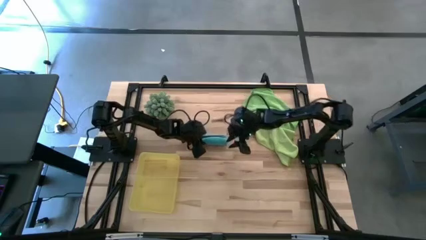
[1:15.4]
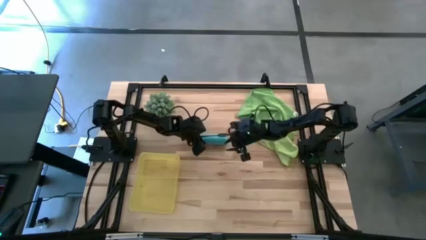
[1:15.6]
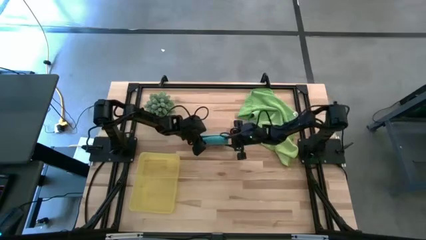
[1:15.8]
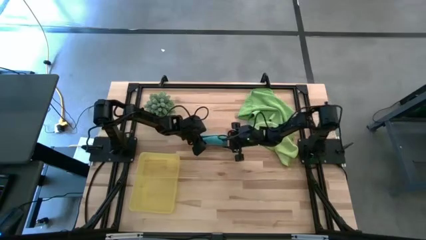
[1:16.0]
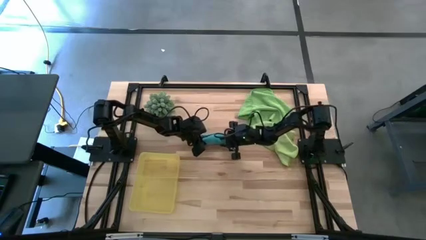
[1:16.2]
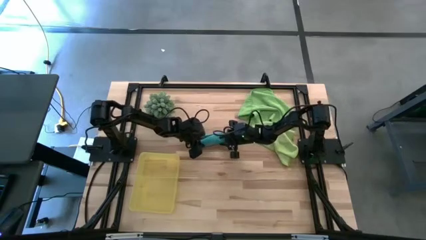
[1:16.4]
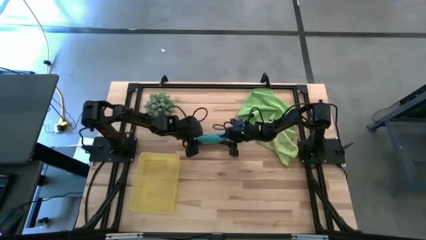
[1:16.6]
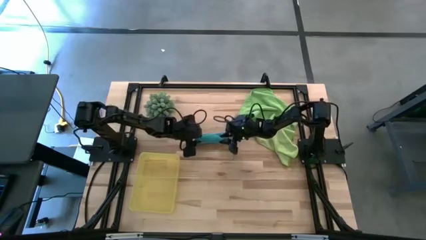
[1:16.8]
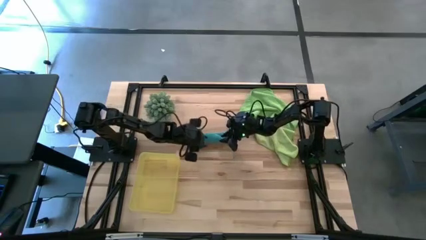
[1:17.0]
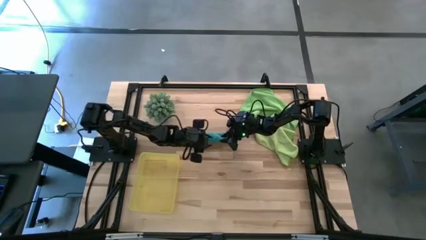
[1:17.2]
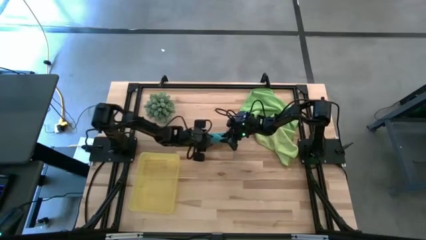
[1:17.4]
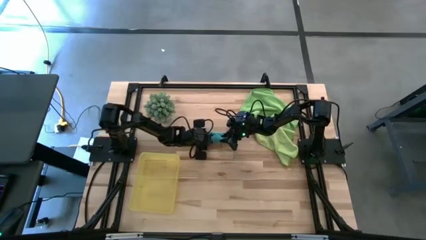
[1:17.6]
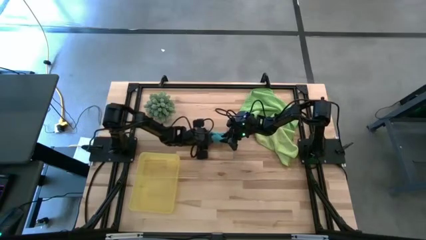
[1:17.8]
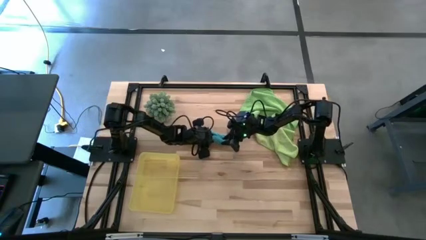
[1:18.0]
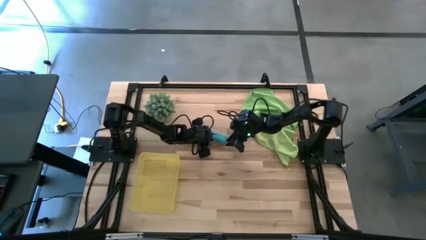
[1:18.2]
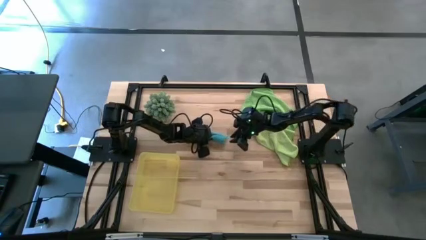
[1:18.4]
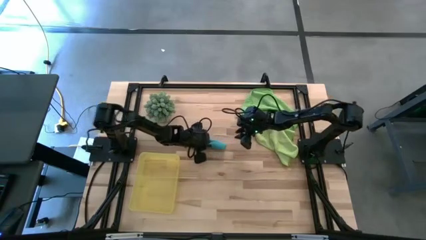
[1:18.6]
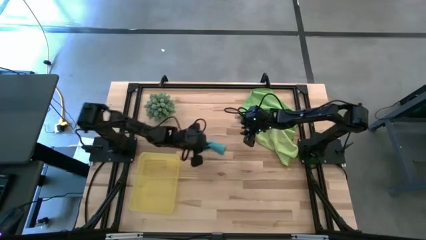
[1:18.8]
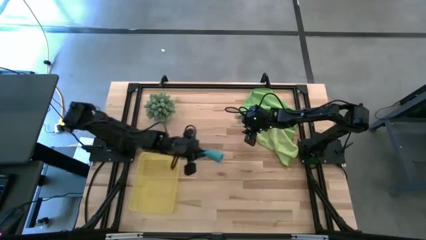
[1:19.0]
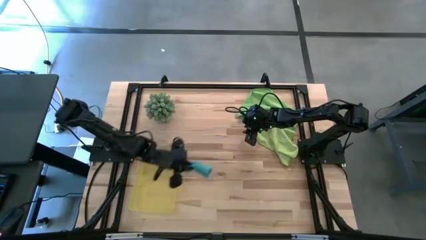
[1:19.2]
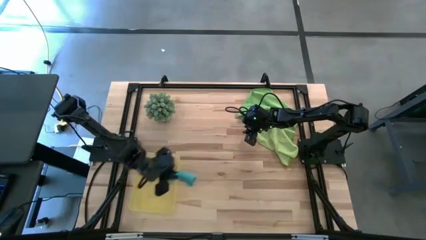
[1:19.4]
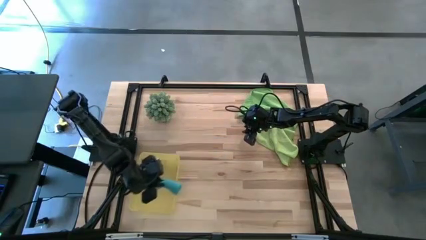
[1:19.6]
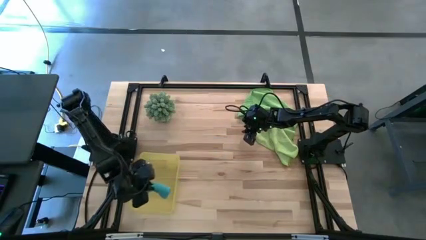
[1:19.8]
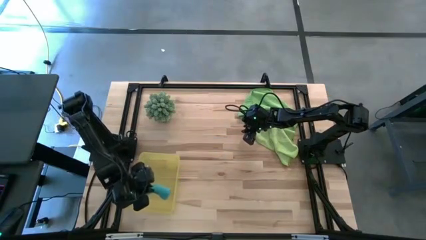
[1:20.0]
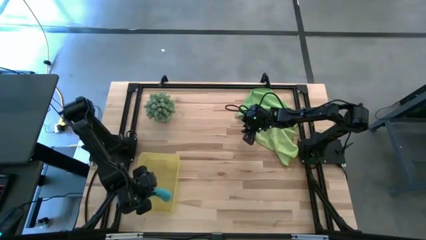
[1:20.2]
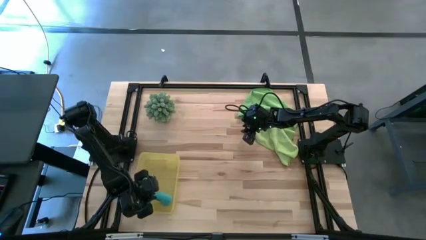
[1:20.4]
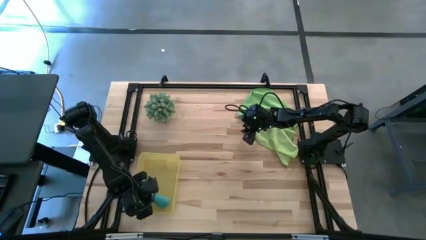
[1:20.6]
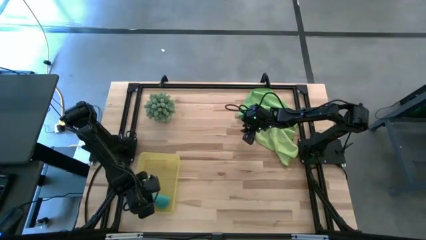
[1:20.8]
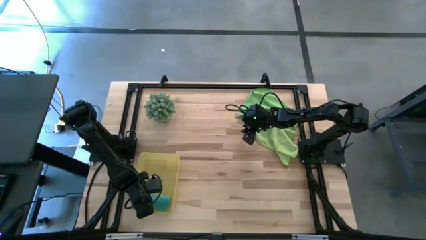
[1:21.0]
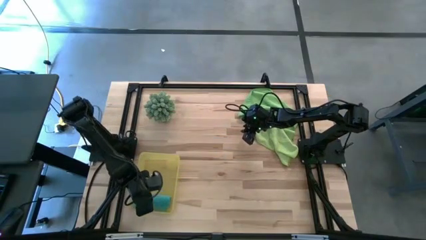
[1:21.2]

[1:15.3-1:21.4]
Task: Roll microfiber towels into tight, uniform cylinder then place into a basket
Put the blue towel into the yellow bin

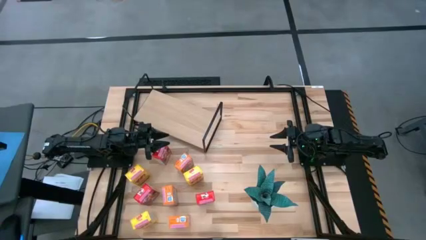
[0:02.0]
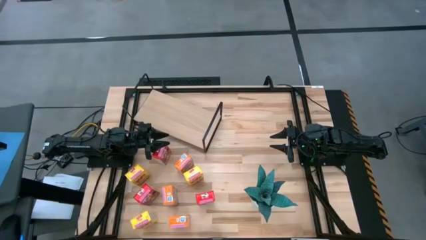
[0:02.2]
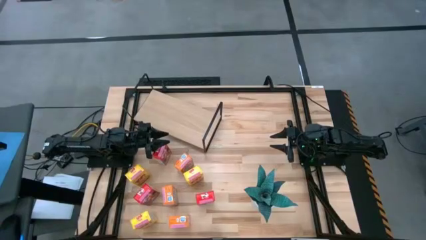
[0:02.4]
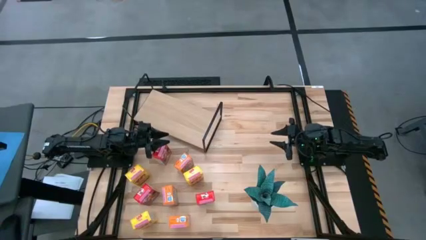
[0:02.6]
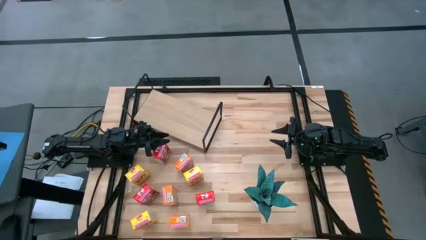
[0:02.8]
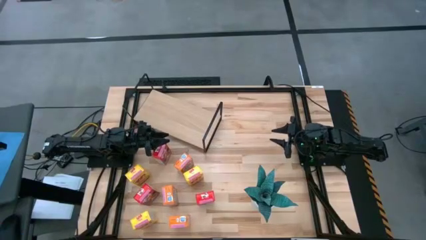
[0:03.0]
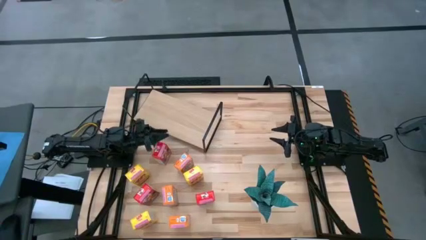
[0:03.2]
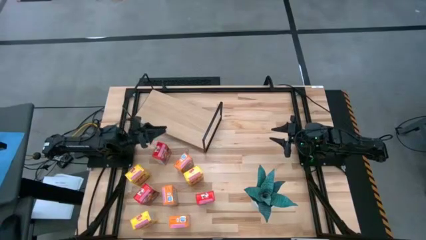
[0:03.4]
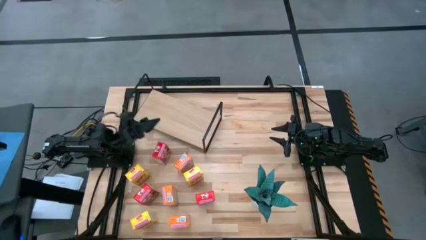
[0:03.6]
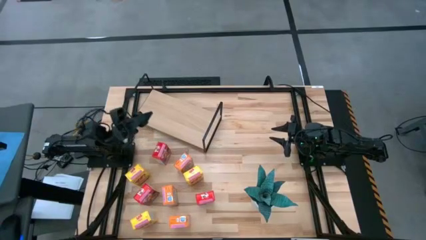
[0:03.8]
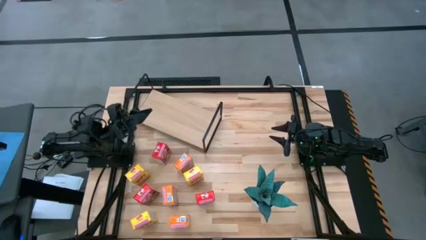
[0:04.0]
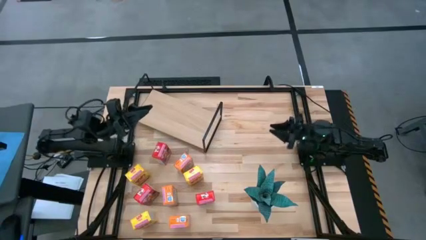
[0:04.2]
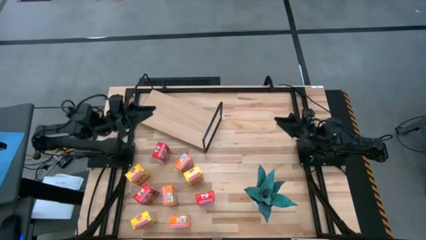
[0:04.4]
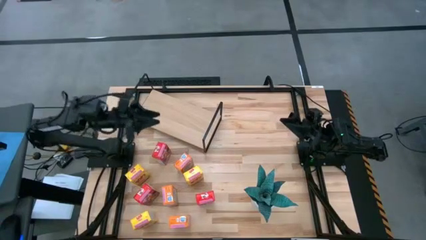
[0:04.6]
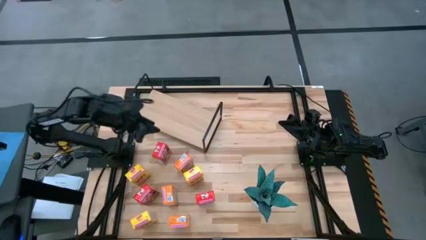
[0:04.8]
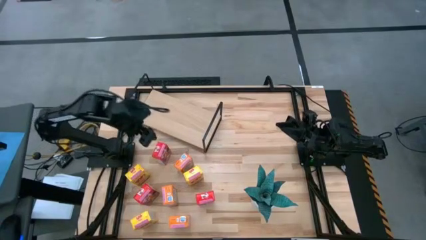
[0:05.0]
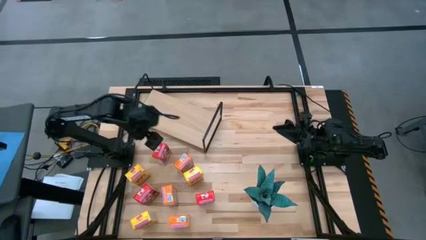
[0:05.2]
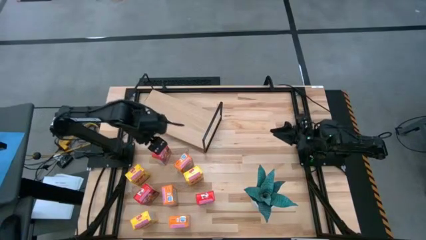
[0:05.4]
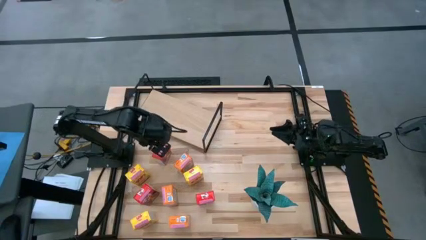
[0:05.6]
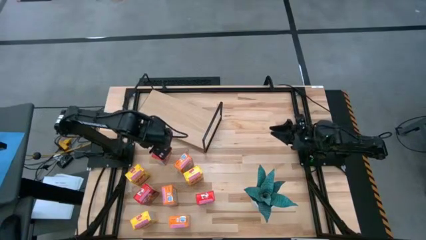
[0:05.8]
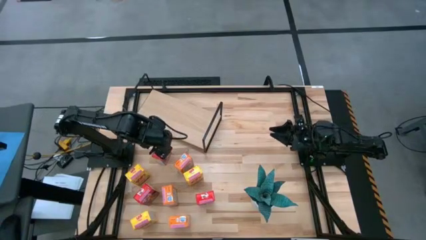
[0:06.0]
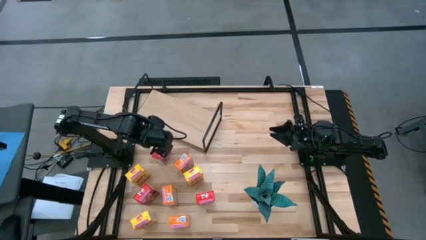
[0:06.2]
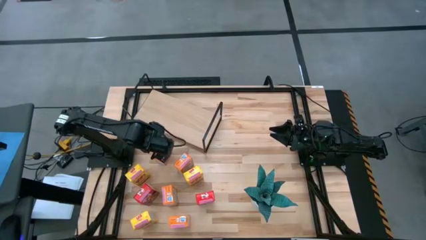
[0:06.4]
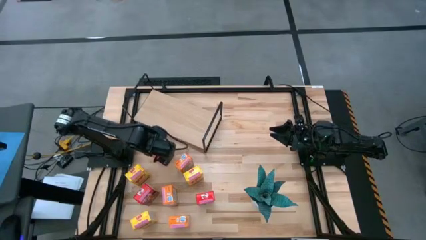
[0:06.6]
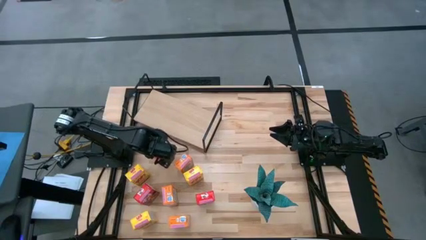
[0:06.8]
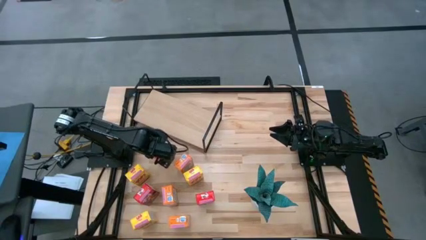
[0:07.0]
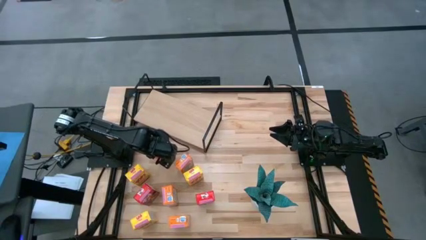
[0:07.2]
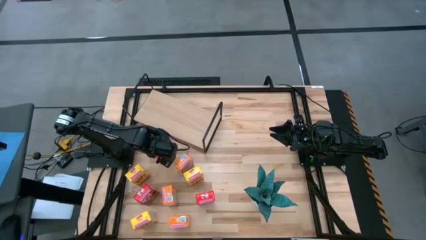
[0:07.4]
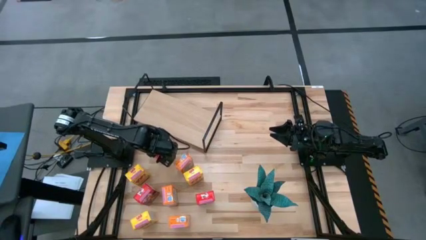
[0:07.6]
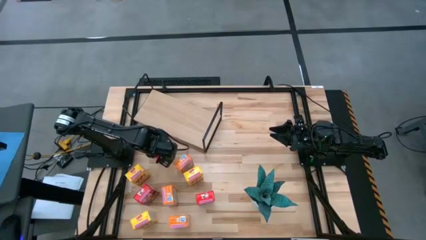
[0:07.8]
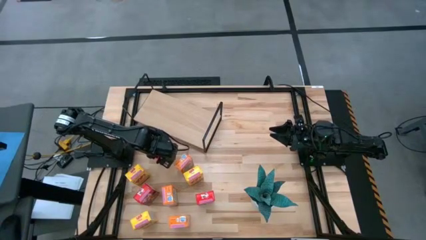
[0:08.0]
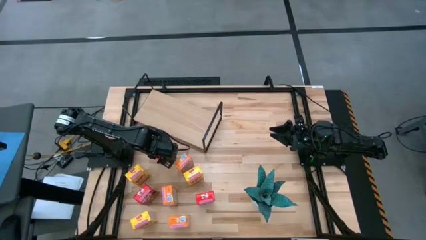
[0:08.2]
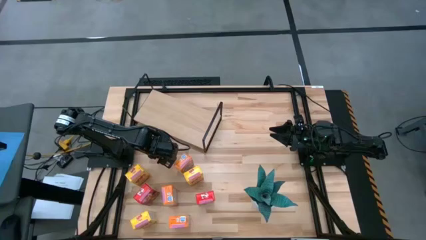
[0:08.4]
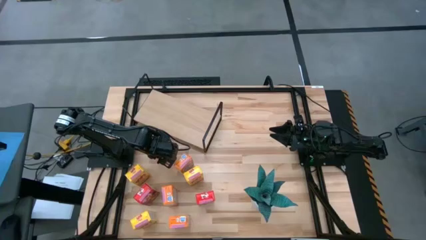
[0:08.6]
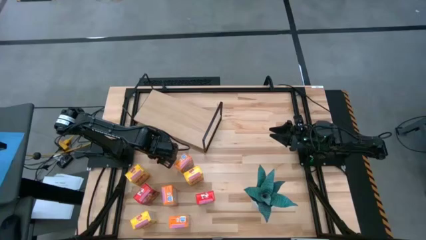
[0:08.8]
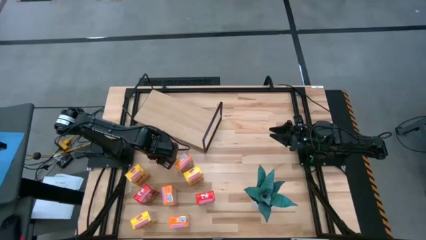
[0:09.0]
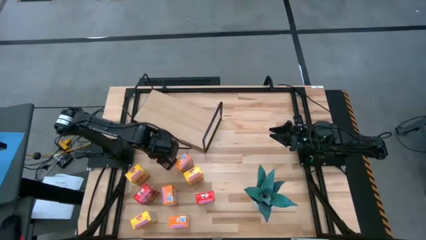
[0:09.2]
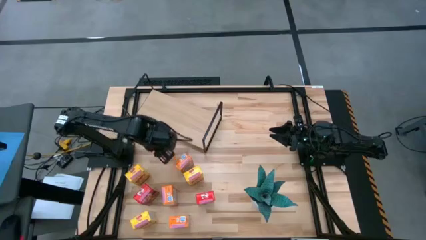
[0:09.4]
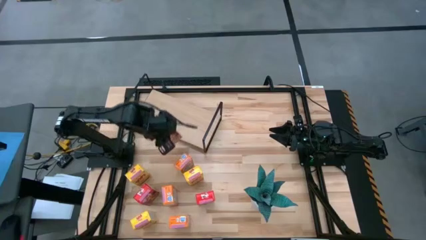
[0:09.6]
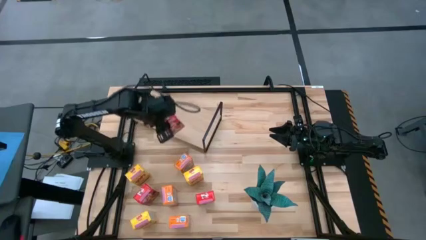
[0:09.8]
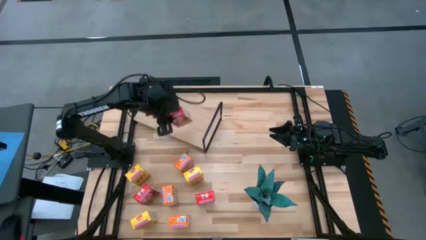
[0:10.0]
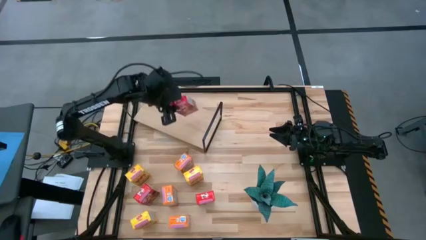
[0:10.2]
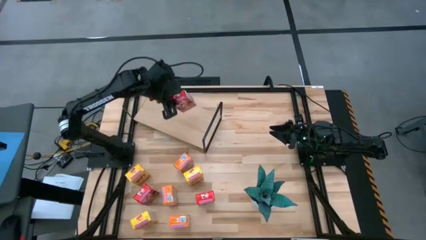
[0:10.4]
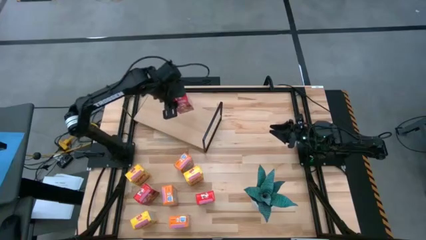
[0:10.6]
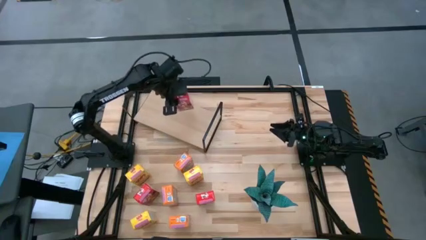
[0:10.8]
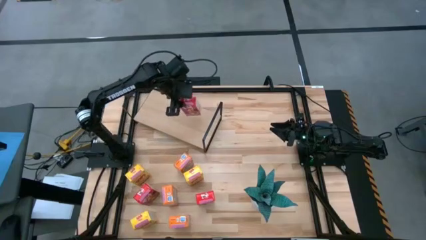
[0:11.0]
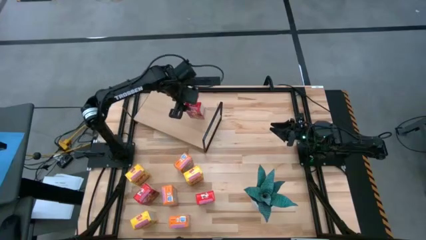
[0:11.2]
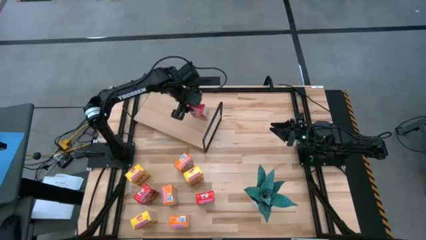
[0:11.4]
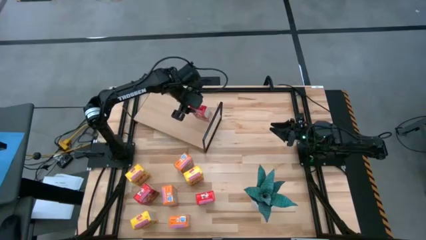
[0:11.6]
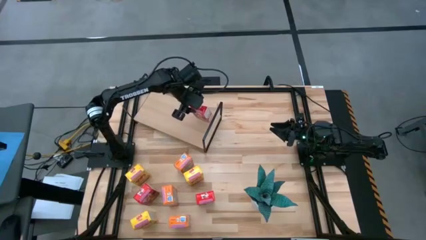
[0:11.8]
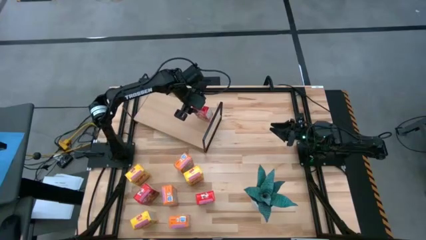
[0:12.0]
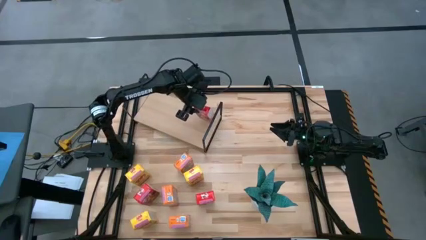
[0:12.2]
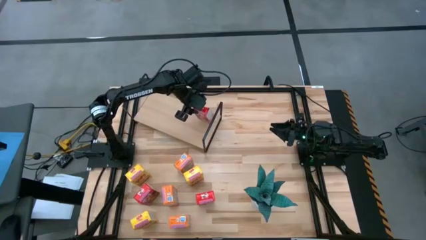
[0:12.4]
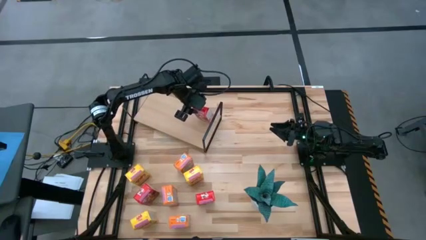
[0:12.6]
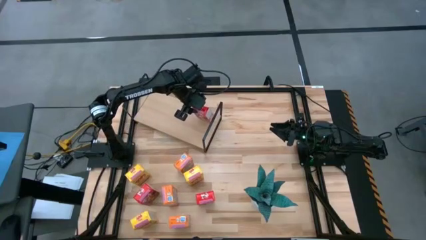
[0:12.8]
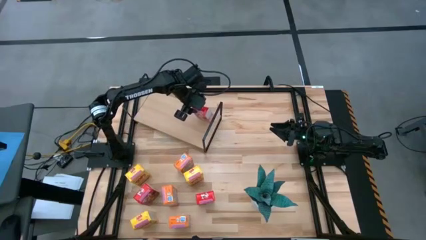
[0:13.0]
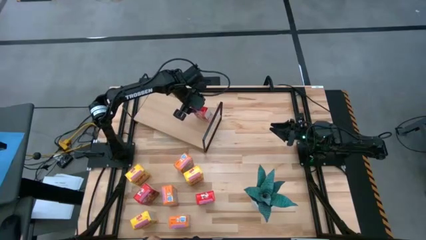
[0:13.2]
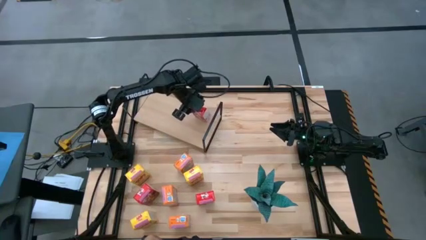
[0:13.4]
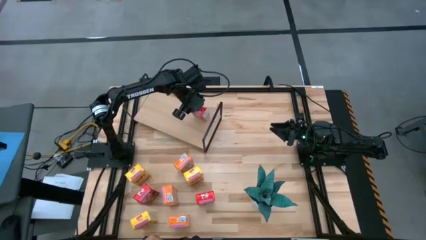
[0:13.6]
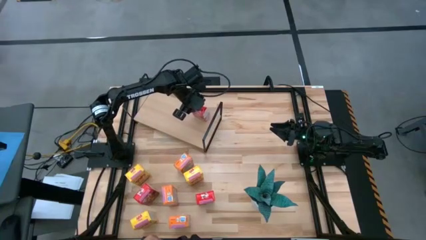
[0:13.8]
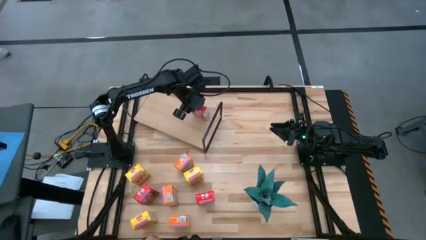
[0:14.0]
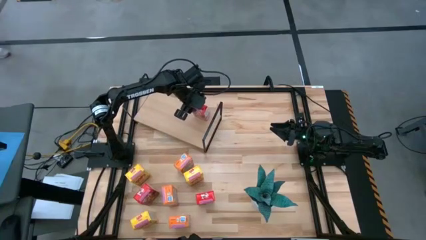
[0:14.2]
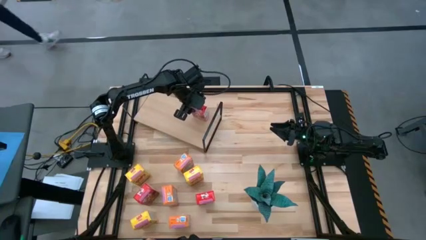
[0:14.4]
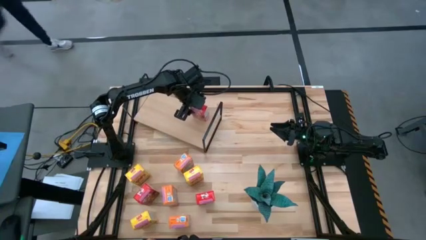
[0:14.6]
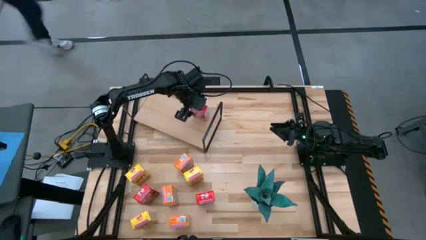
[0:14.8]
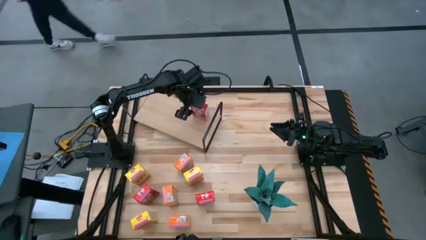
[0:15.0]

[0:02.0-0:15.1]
Task: Stack cereal on shelf
Put the top red cereal box on the shelf
